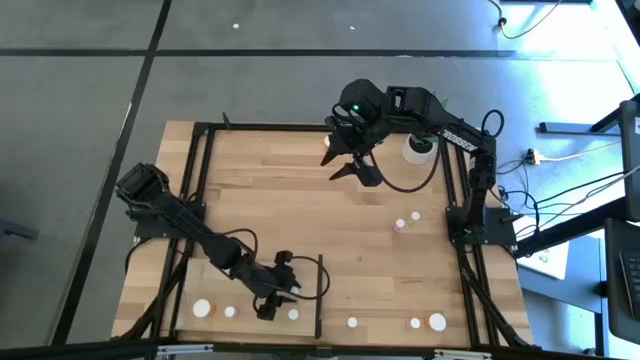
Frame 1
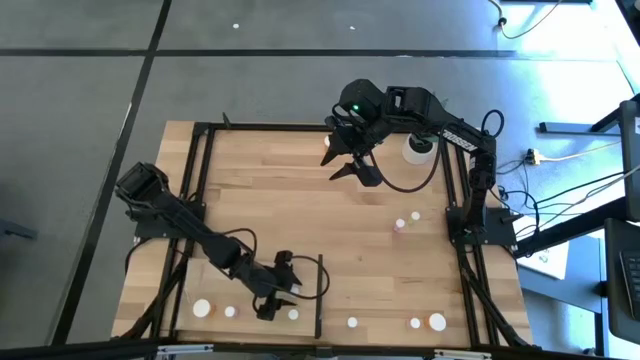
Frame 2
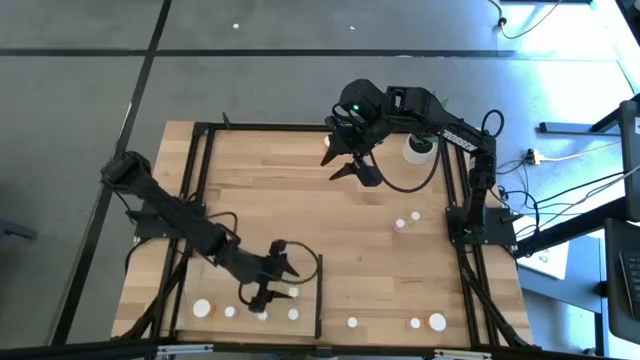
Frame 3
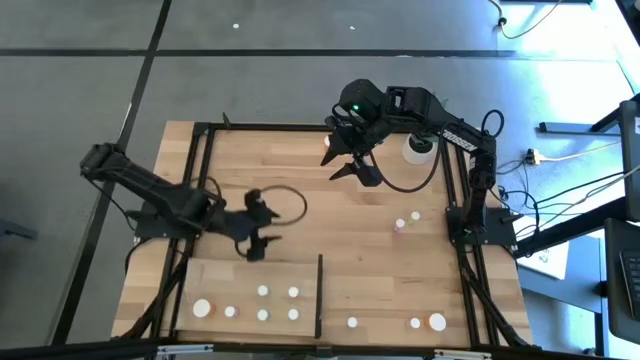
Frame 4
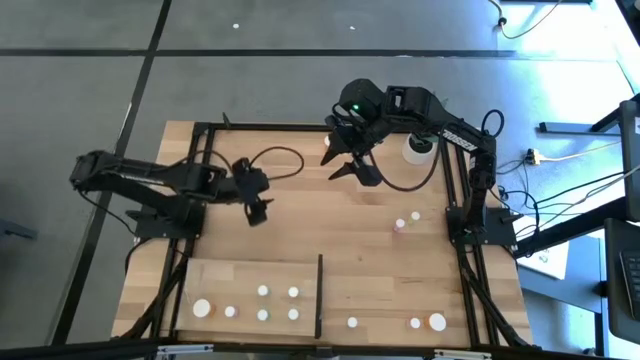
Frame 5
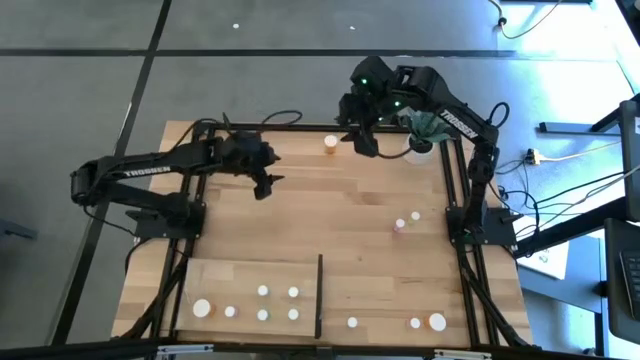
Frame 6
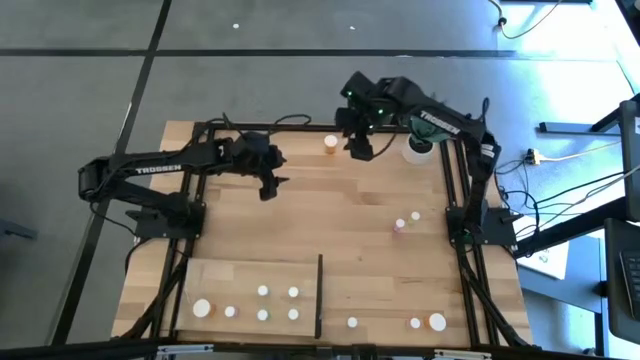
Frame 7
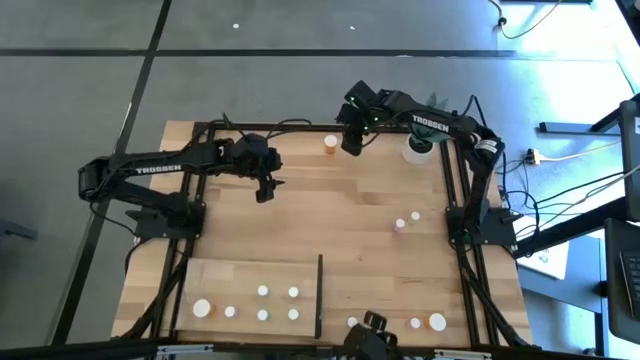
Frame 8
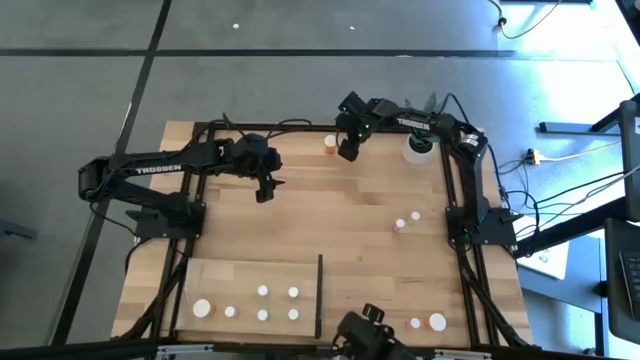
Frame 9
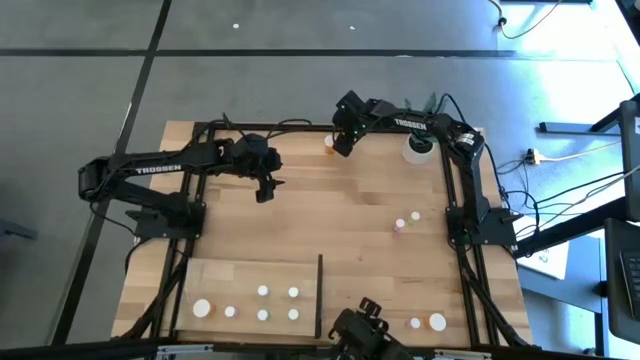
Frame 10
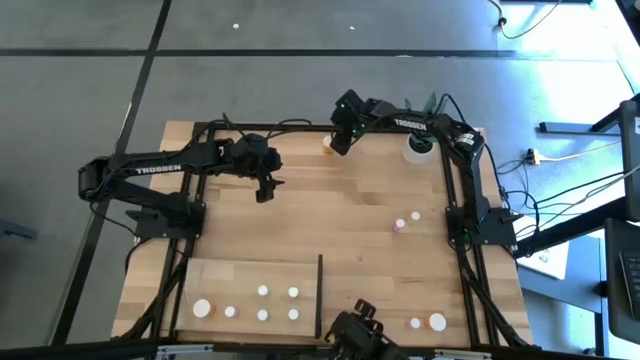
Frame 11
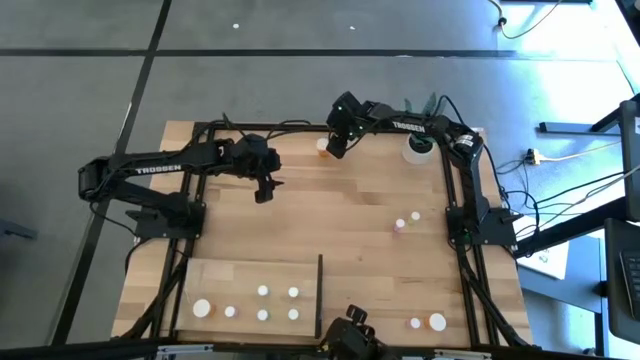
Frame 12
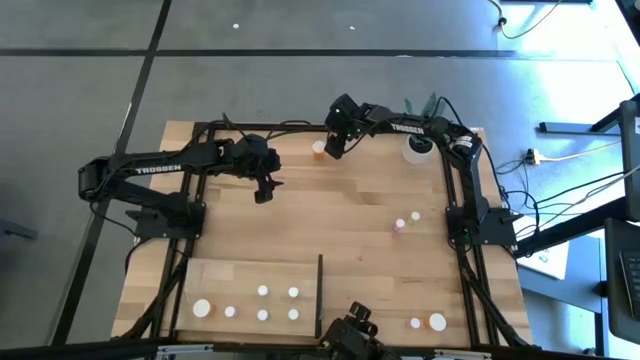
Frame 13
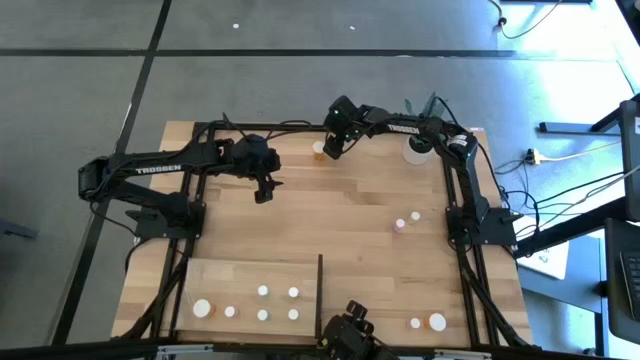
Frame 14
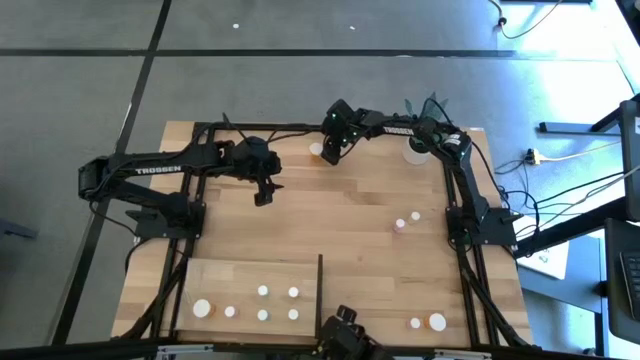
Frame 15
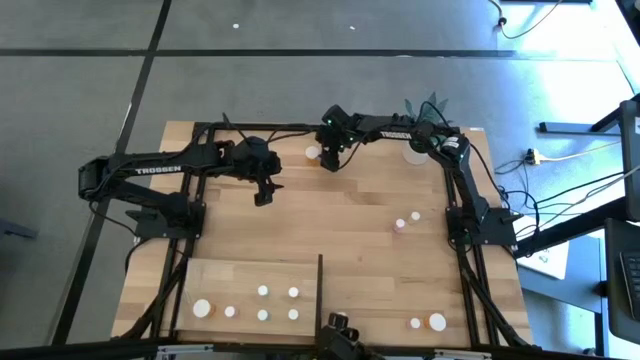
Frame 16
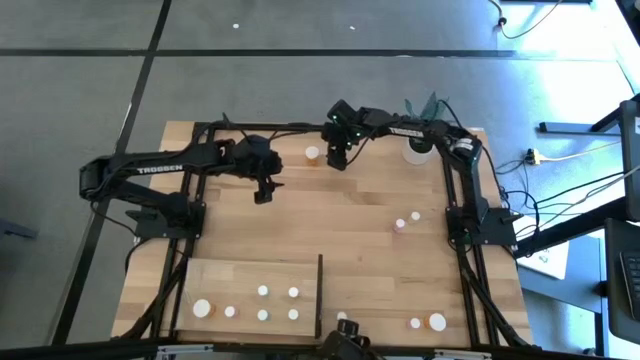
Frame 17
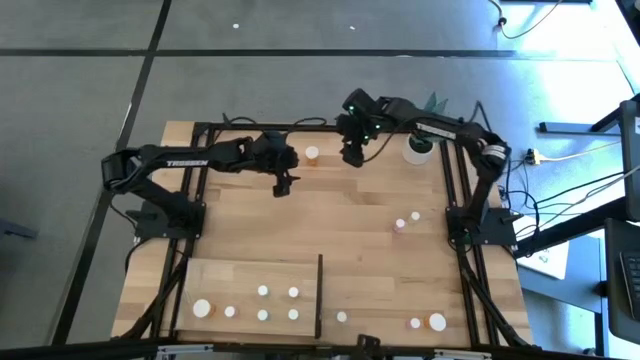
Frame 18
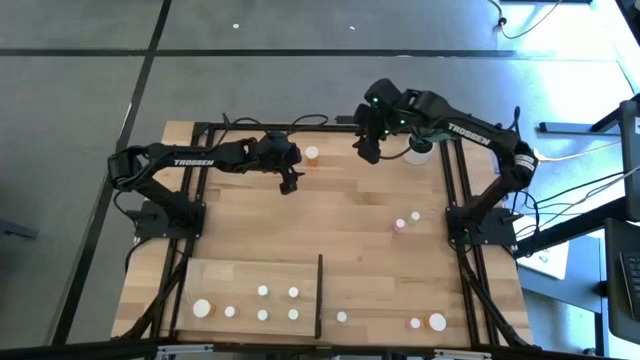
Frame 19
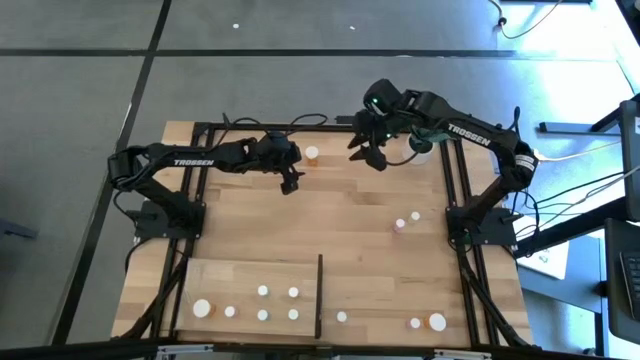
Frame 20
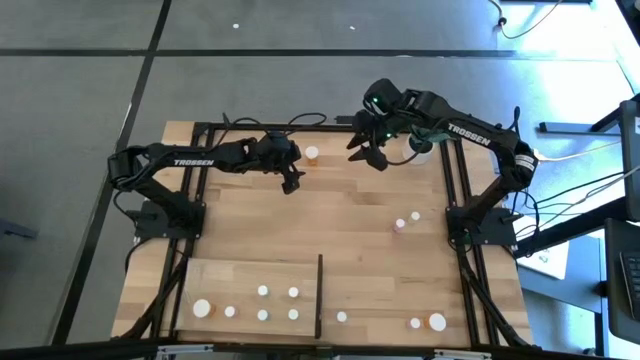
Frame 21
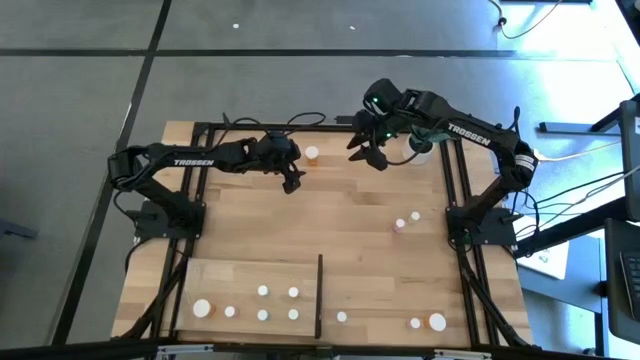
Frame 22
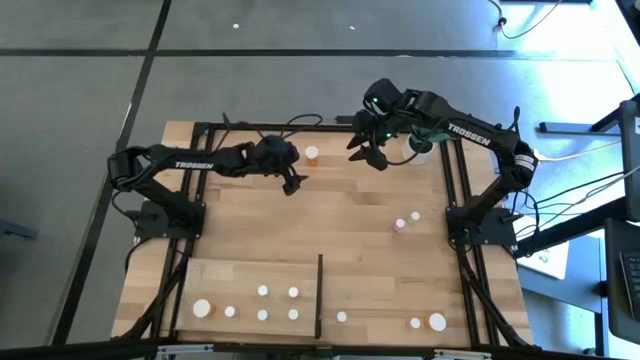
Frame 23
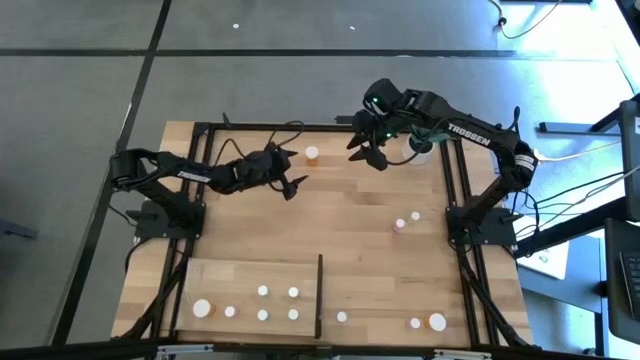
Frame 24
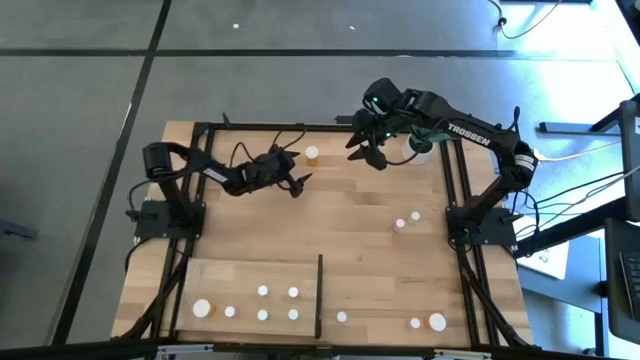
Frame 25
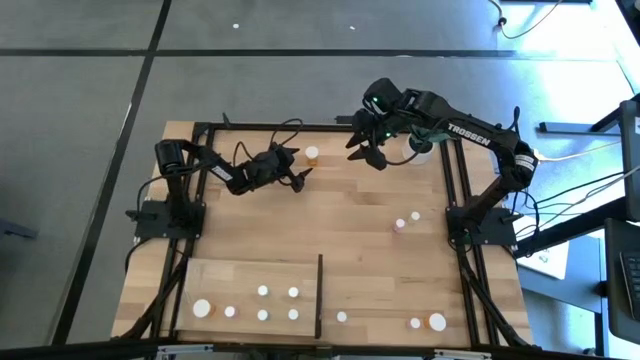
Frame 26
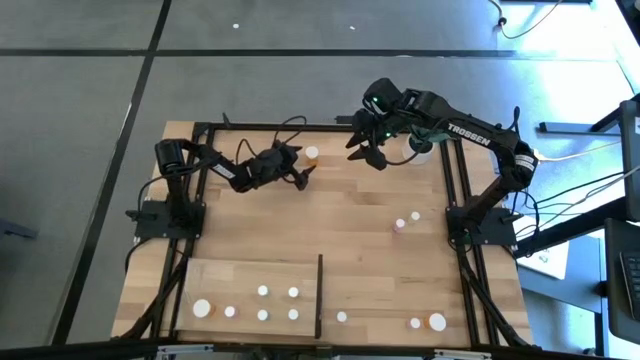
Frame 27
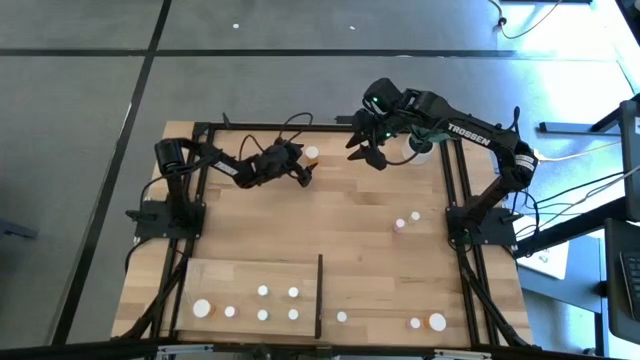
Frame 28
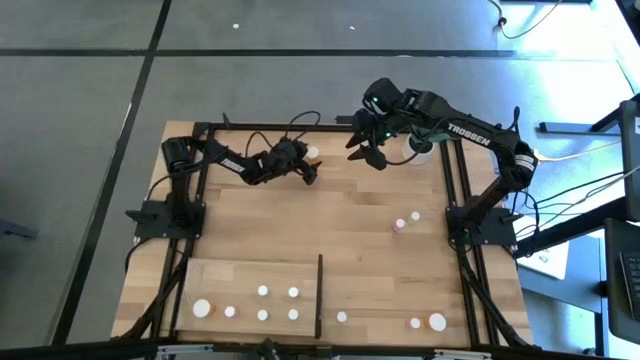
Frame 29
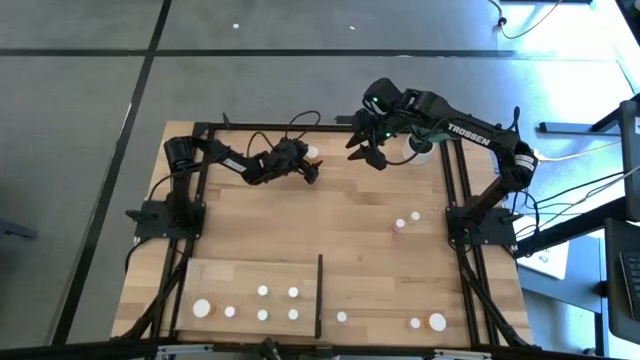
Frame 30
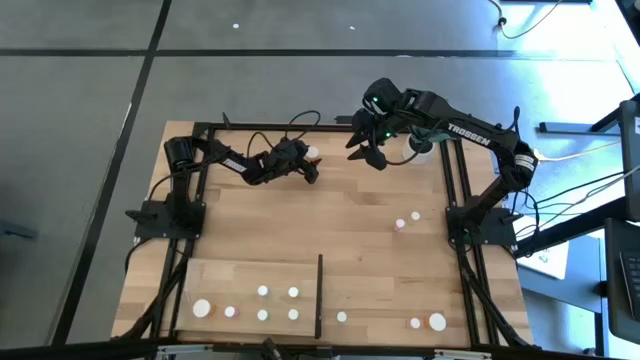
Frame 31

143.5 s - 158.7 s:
Task: Pick and place medicine bottles onto shelf by color
Put the top orange pill bottle on the shelf aligned with the other orange pill bottle

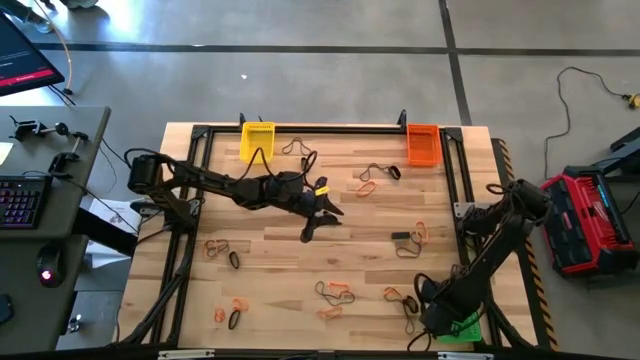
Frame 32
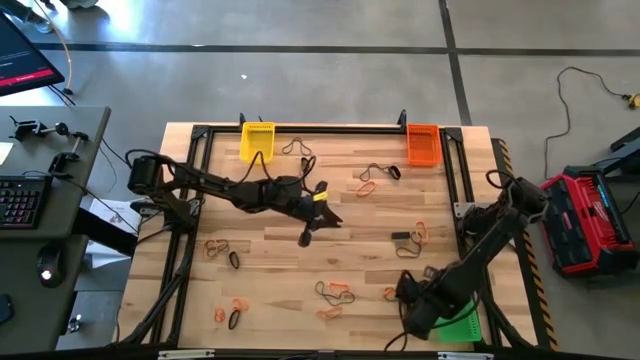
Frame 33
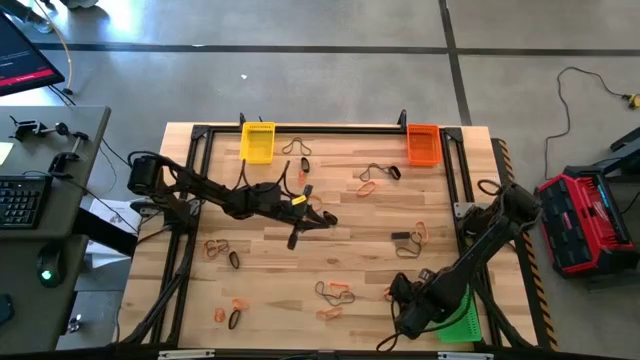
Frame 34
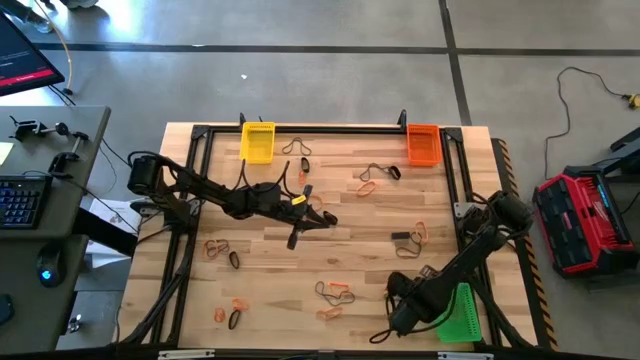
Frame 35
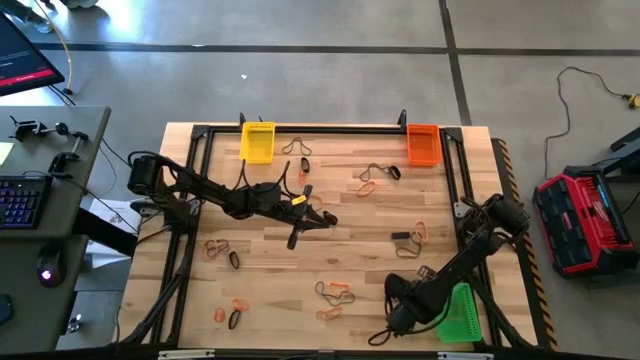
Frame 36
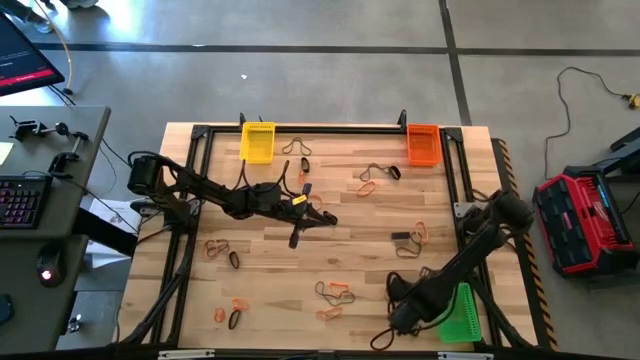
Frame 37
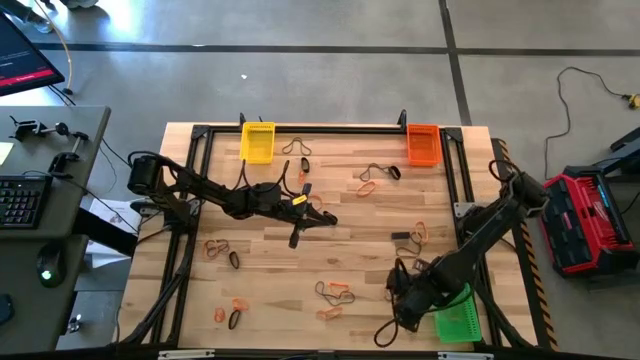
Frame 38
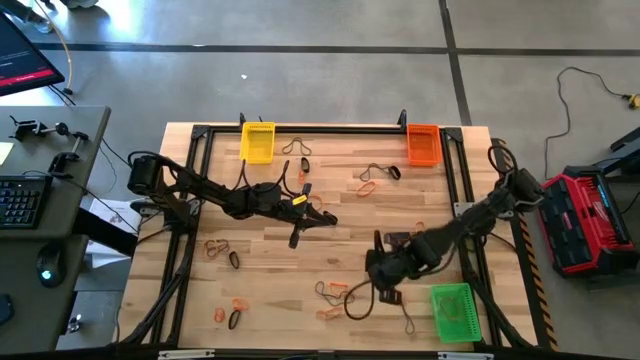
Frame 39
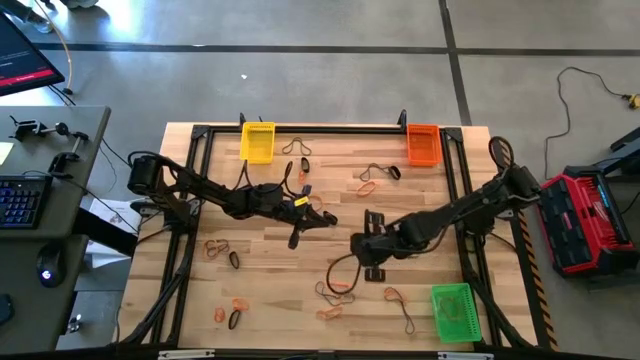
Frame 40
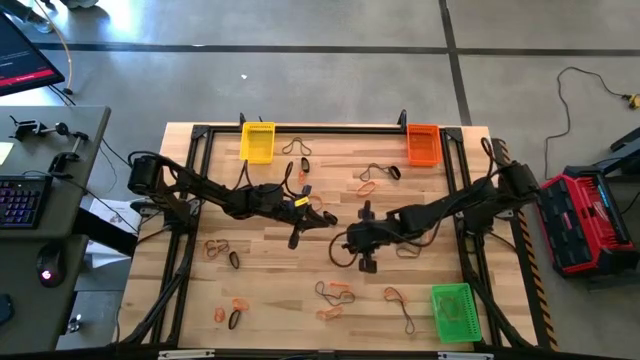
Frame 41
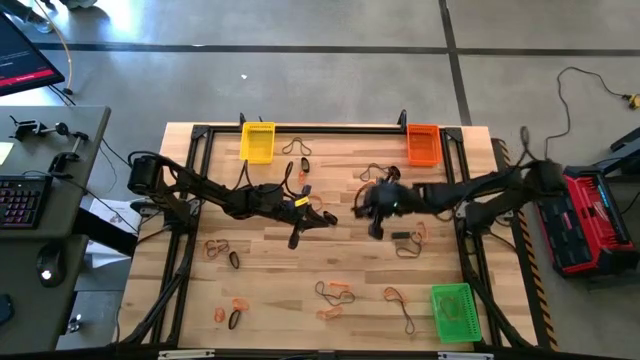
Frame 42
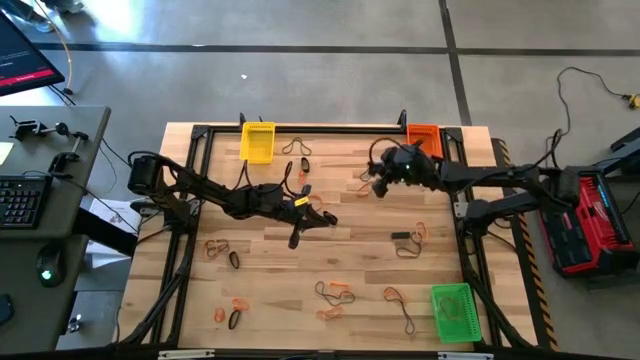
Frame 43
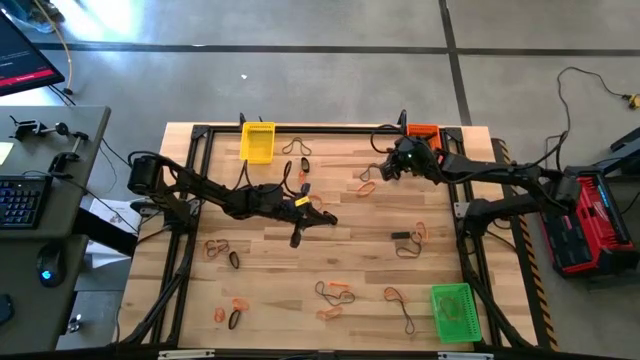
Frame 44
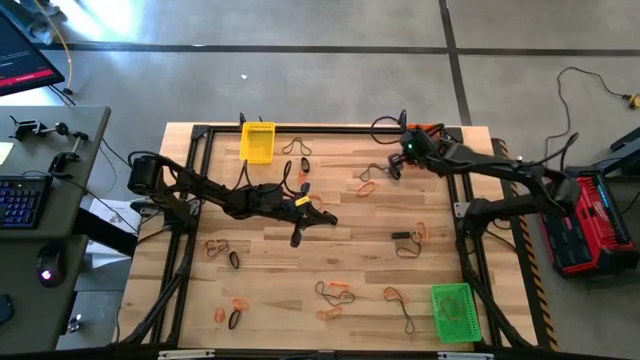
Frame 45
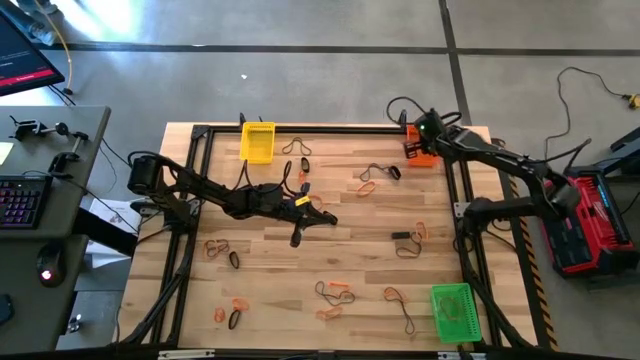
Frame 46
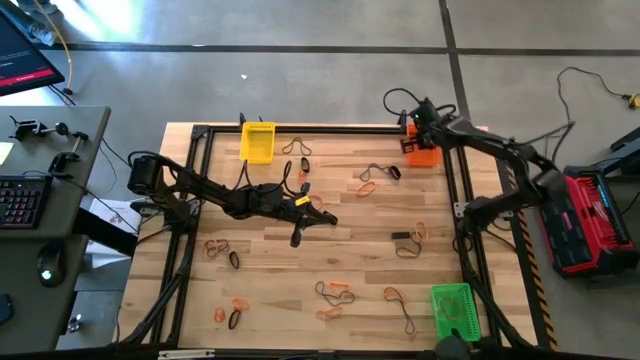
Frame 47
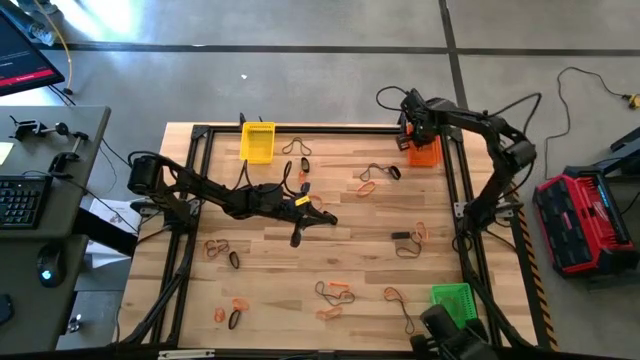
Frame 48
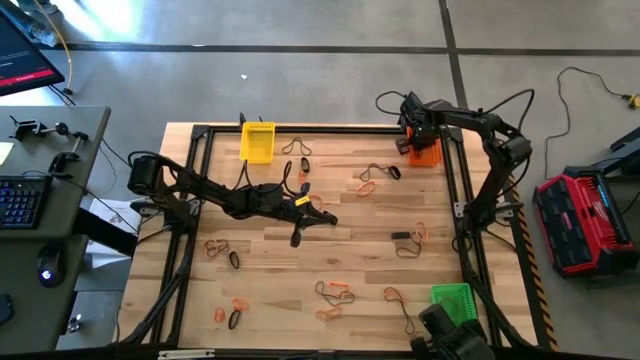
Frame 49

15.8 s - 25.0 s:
Task: Sort rubber bands into baskets
Put the black rubber band into the orange bin
